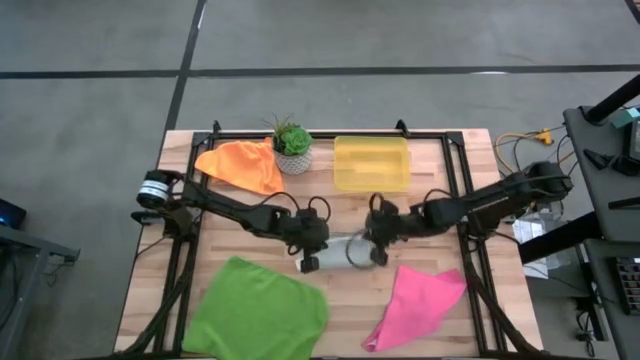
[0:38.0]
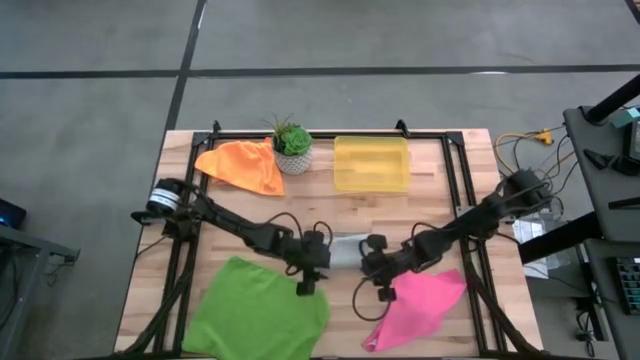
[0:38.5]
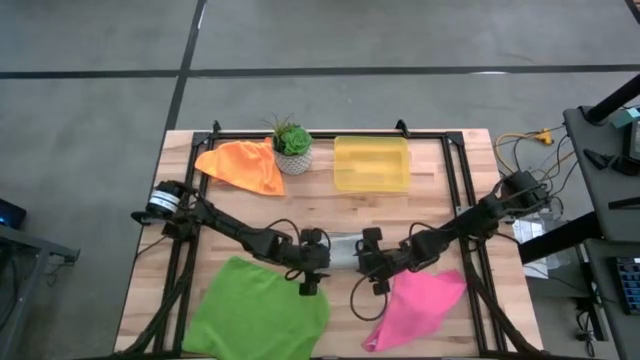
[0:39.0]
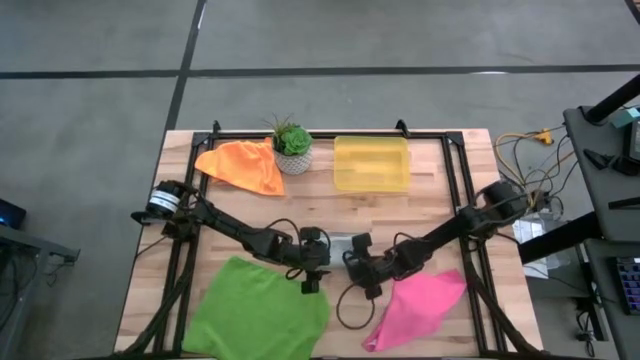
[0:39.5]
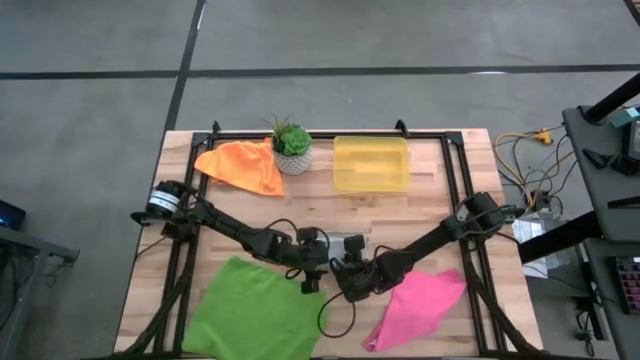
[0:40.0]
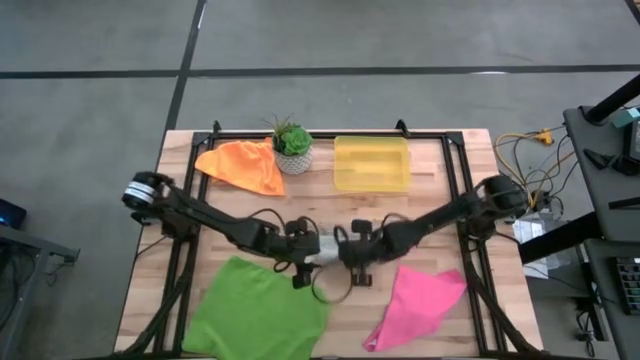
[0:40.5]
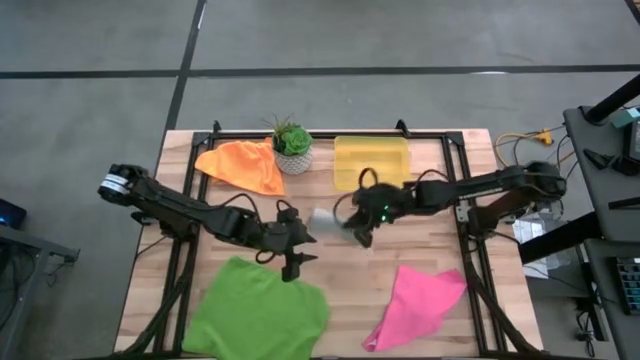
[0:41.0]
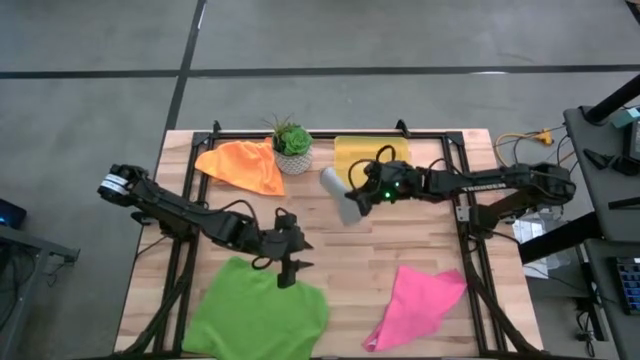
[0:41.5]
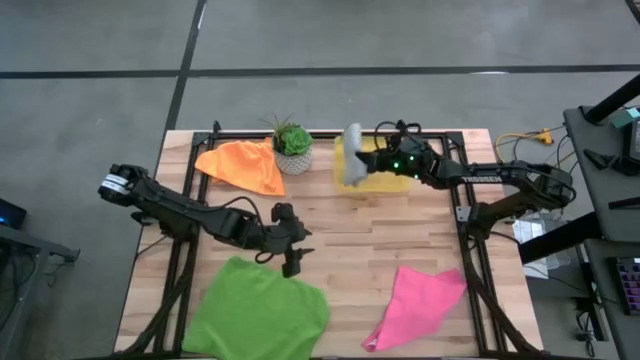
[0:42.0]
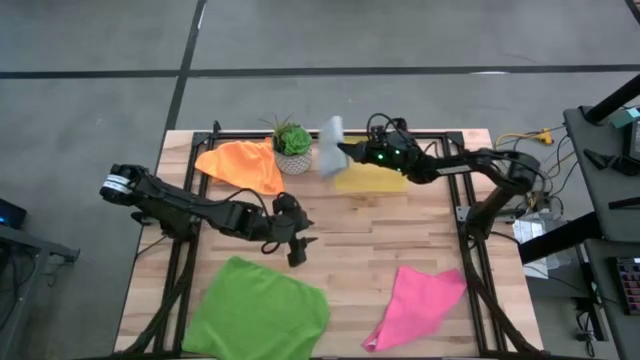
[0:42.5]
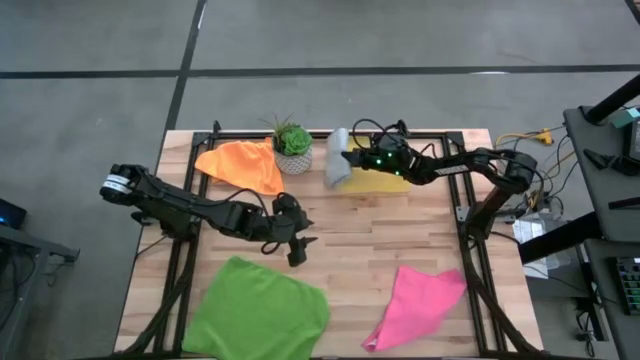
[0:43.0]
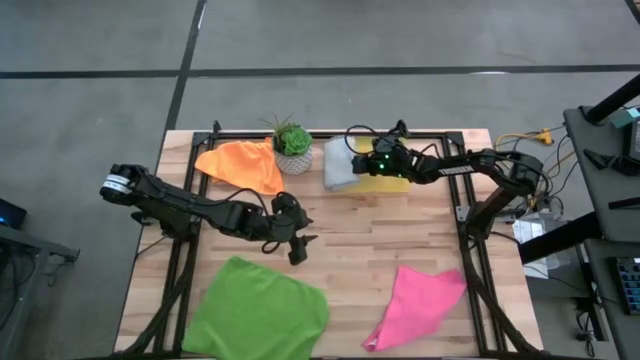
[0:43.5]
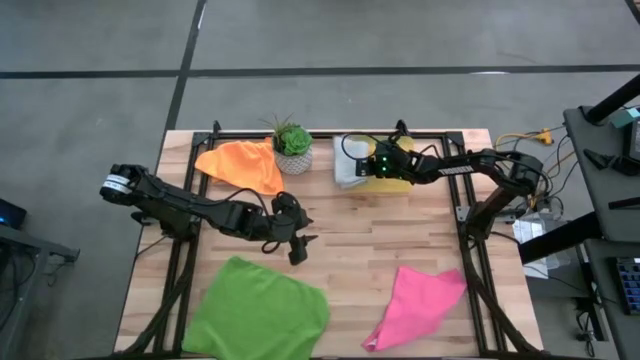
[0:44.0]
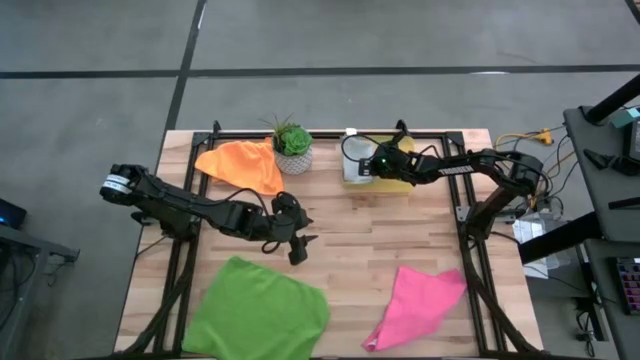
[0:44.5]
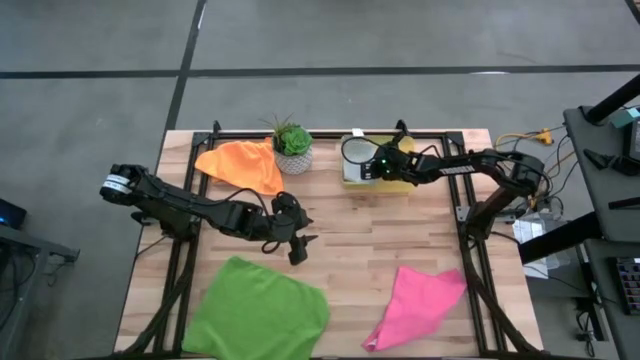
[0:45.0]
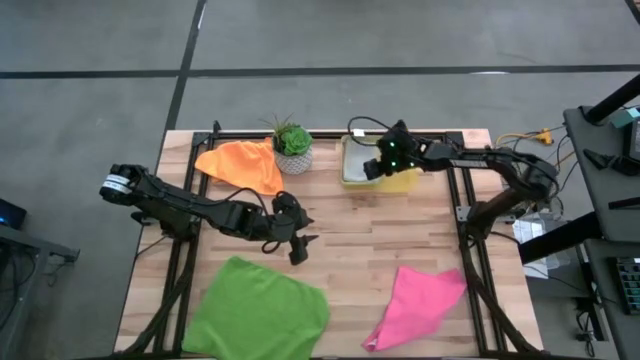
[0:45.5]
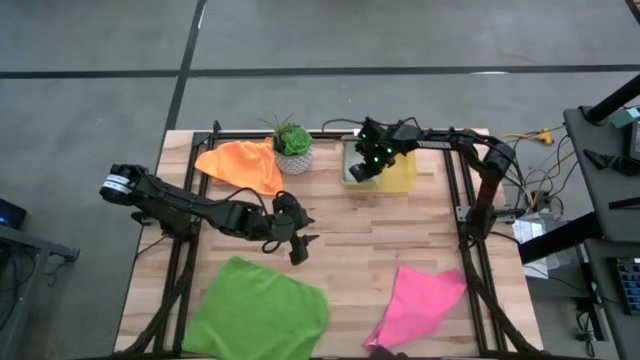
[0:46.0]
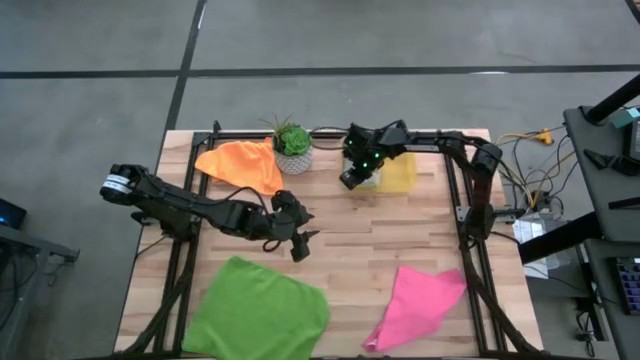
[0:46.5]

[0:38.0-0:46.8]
Task: Fold microfiber towels
Put the gray microfiber cloth into the yellow bin

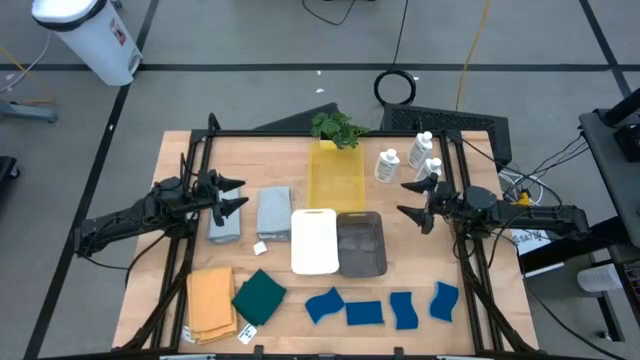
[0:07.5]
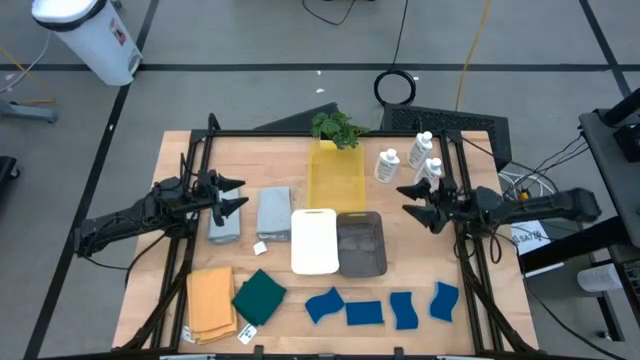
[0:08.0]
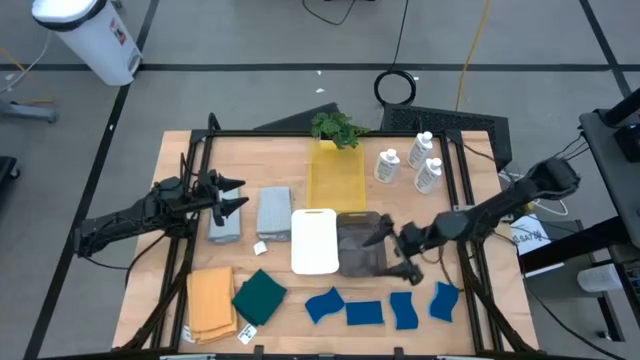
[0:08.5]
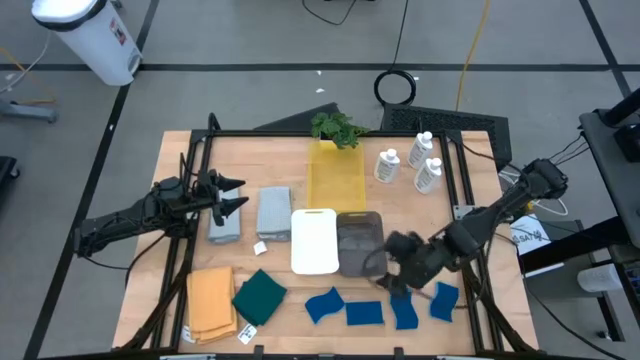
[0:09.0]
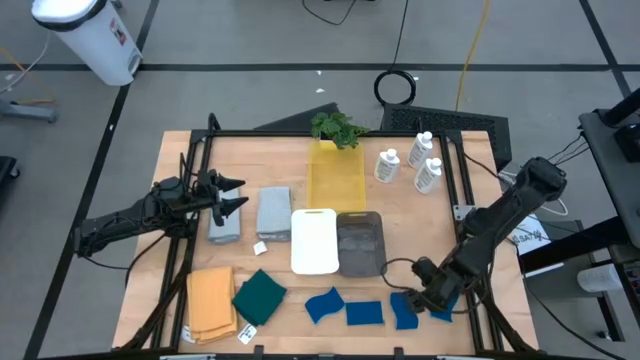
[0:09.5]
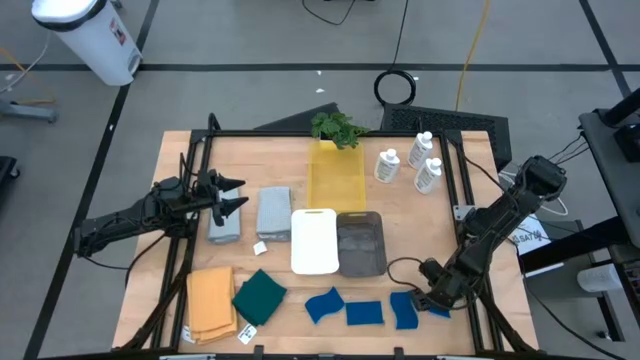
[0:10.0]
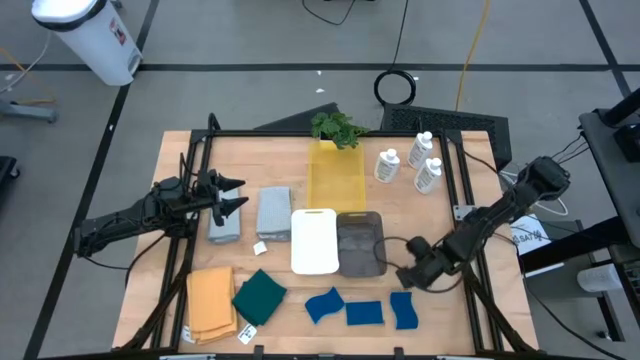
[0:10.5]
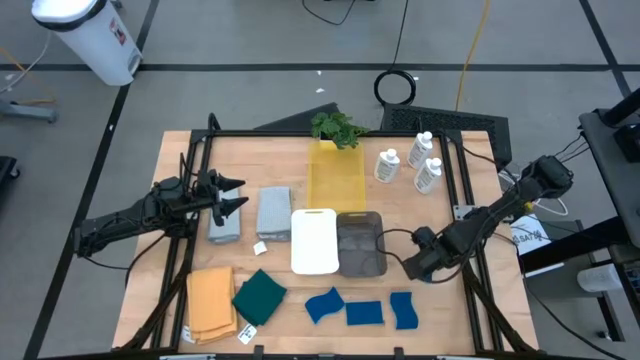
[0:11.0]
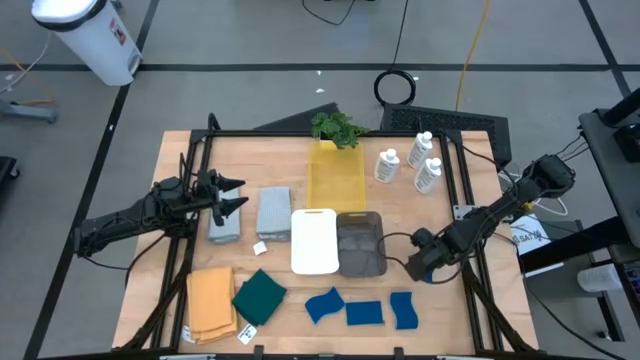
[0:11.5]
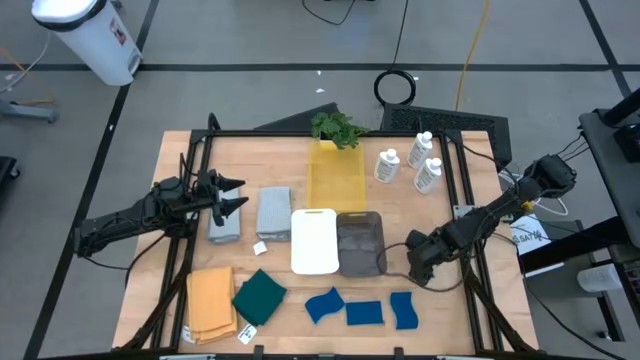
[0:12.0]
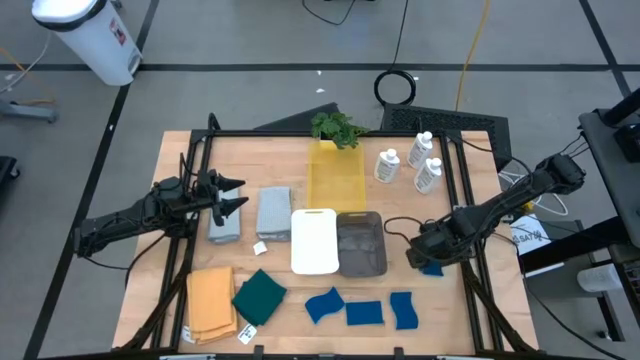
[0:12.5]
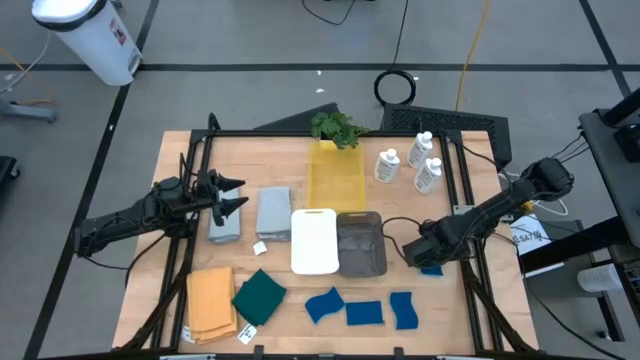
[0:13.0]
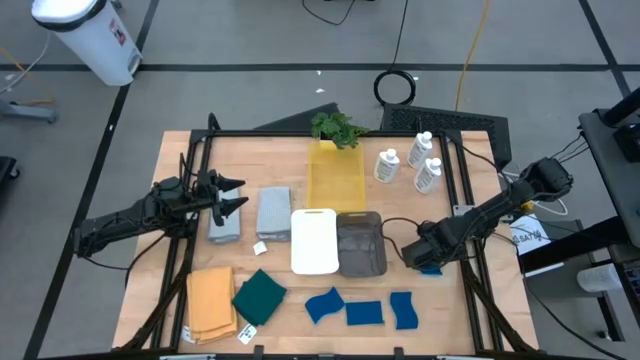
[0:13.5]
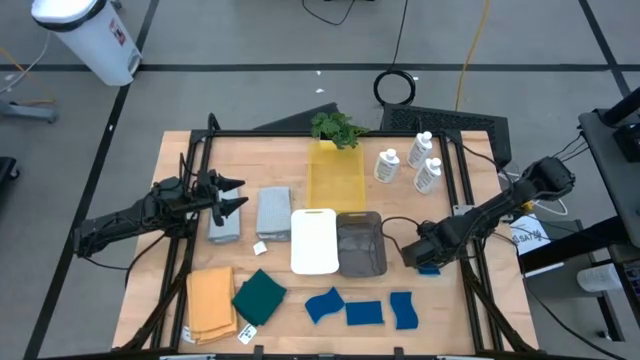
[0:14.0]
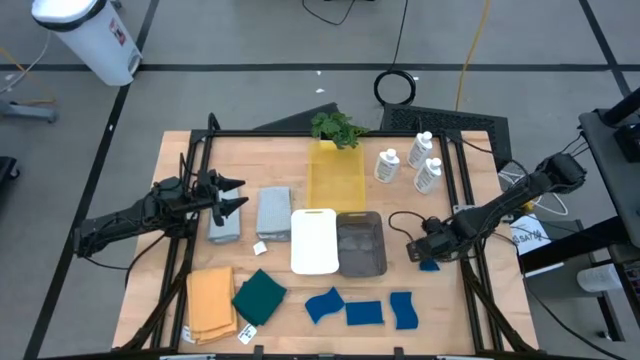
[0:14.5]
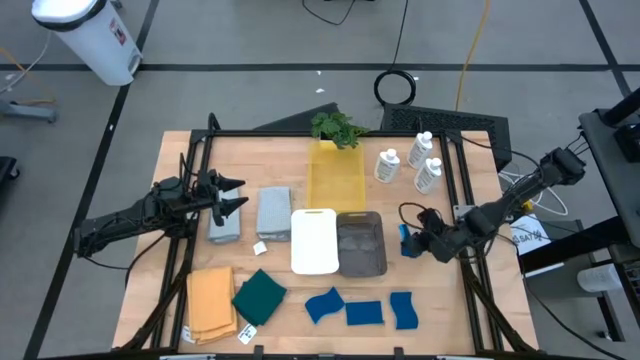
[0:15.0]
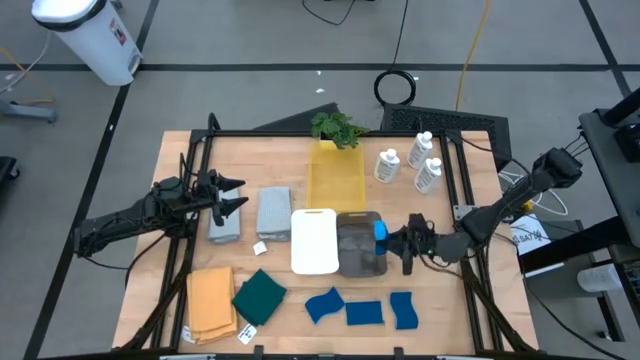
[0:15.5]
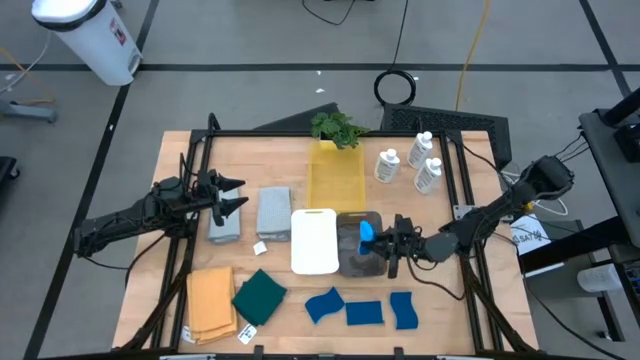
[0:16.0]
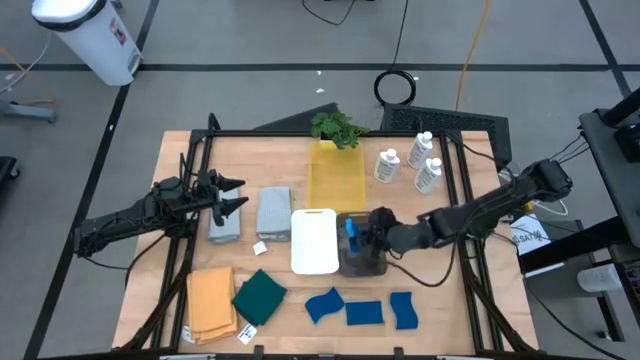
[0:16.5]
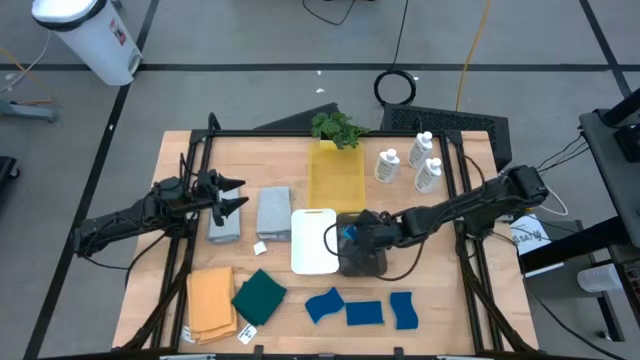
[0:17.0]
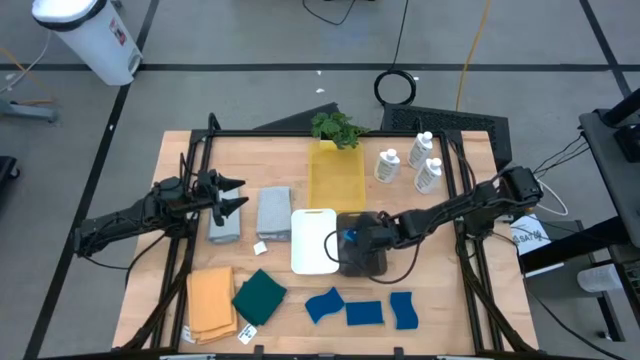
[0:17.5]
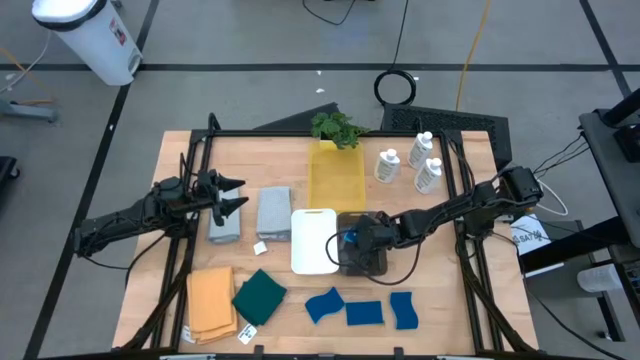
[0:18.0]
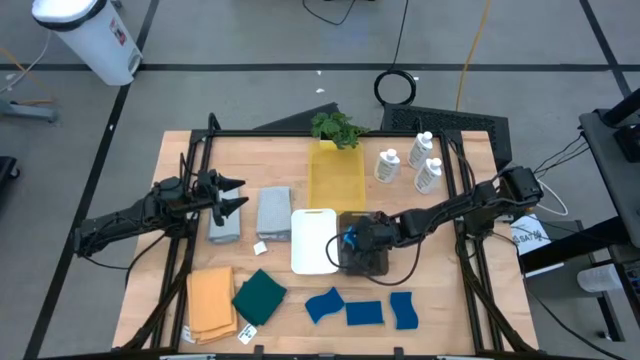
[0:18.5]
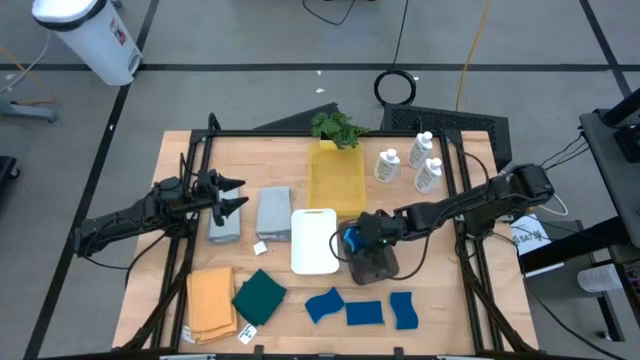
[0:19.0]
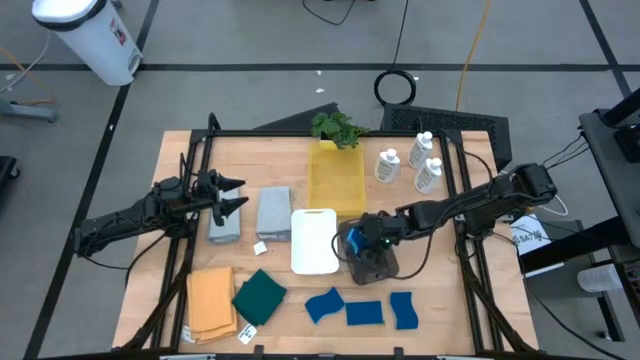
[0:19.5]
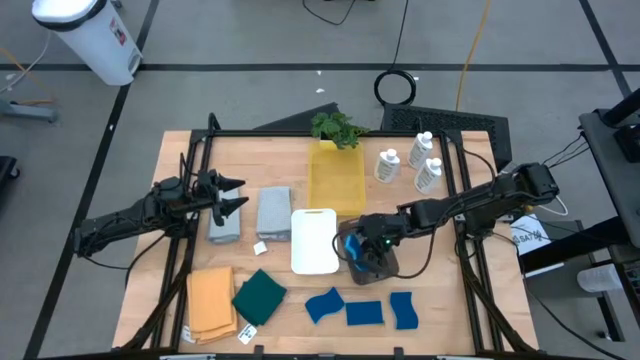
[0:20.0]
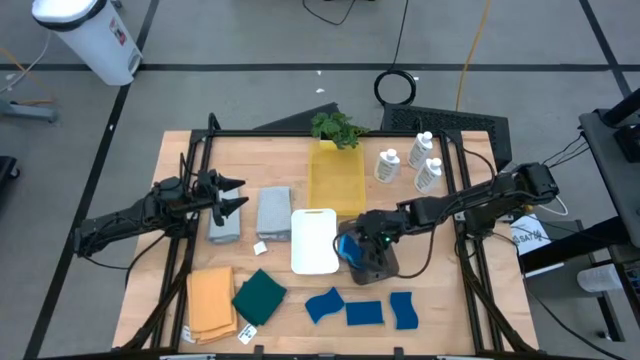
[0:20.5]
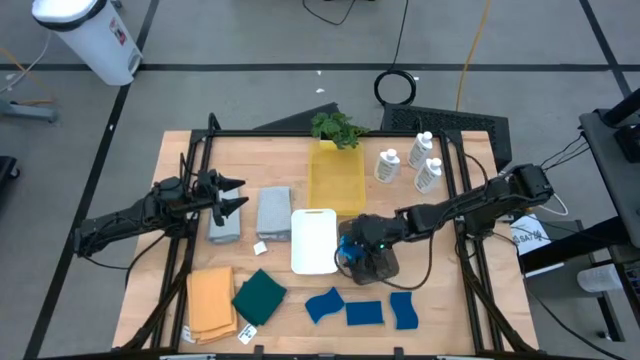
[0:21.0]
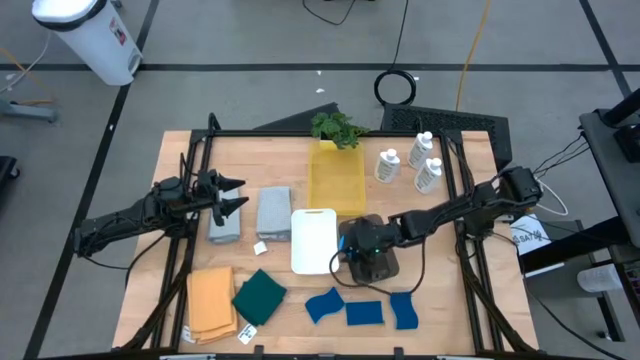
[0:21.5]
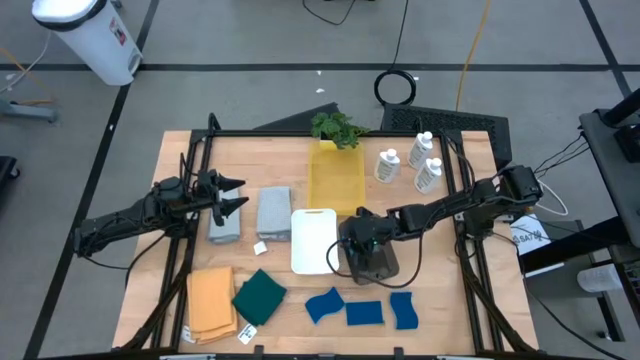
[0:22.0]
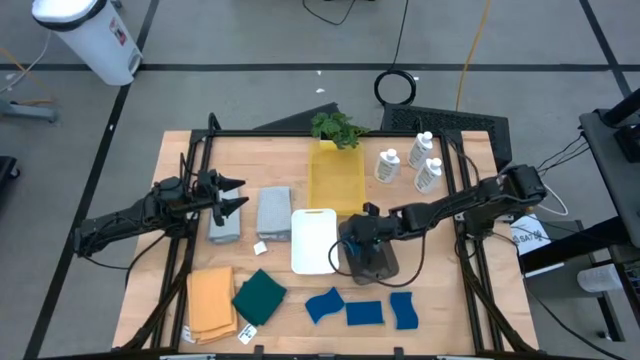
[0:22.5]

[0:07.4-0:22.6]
Task: Pick & Place Kitchen Items
Put the sponge wipe into the black bin
